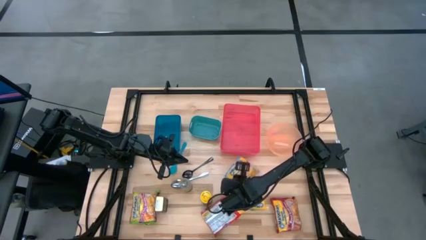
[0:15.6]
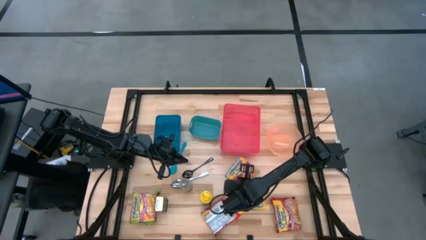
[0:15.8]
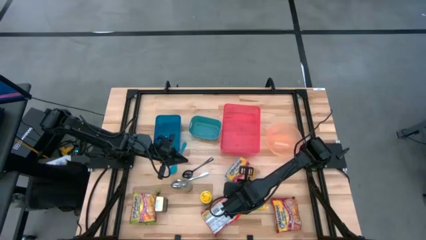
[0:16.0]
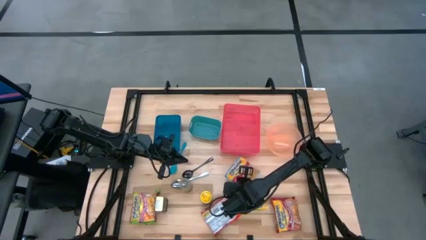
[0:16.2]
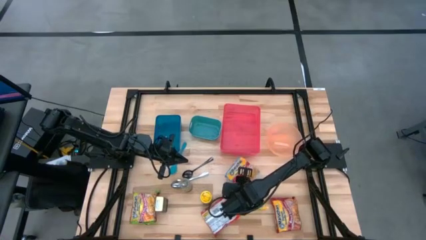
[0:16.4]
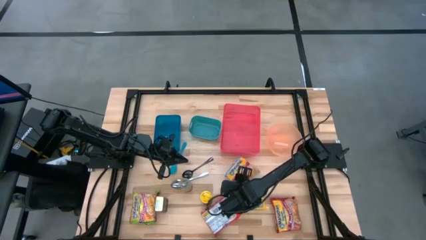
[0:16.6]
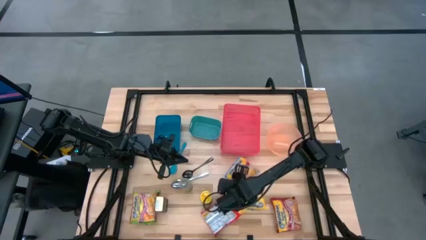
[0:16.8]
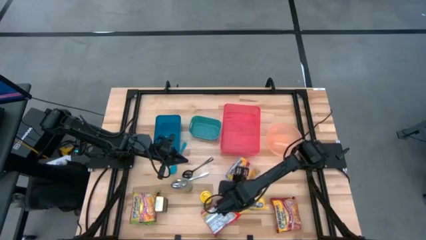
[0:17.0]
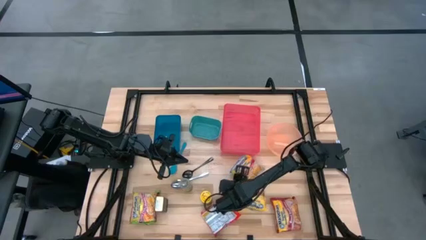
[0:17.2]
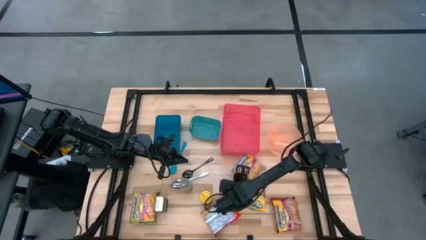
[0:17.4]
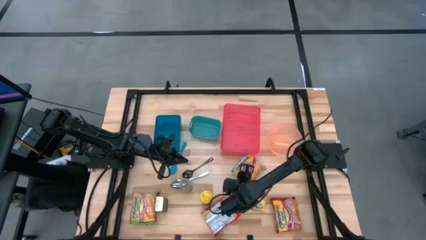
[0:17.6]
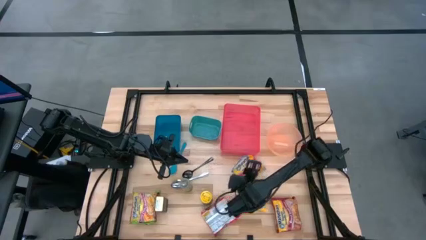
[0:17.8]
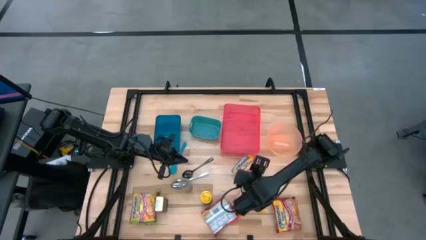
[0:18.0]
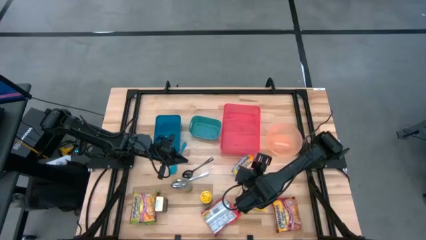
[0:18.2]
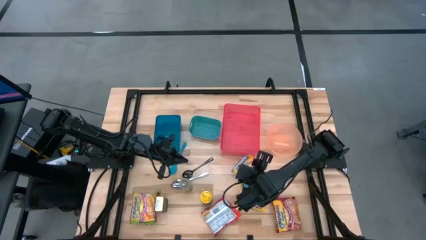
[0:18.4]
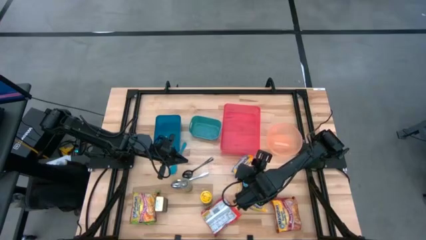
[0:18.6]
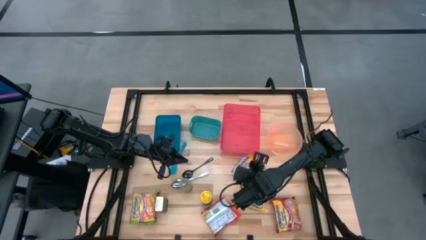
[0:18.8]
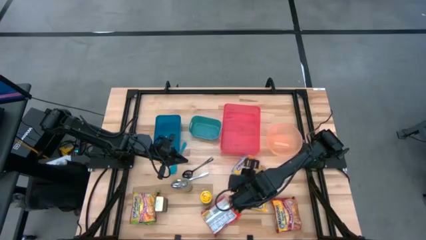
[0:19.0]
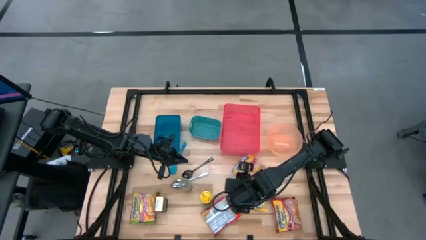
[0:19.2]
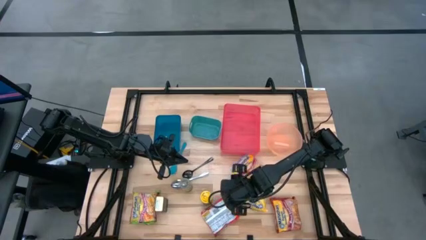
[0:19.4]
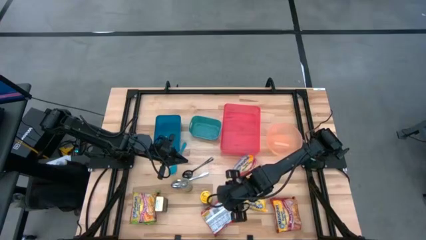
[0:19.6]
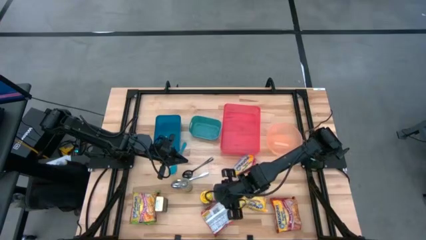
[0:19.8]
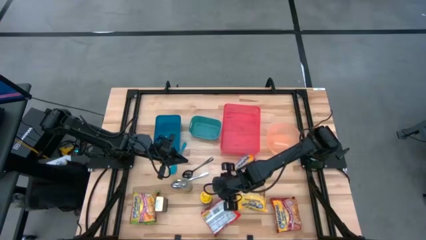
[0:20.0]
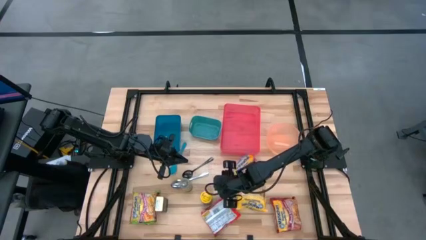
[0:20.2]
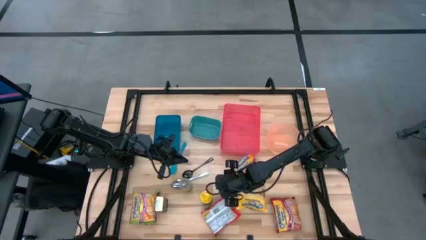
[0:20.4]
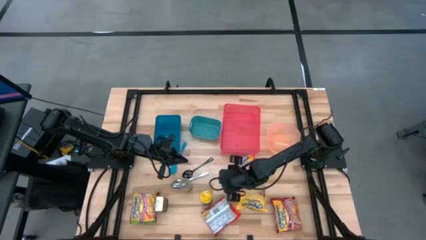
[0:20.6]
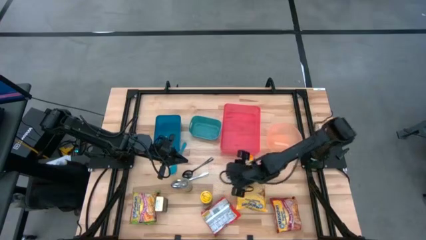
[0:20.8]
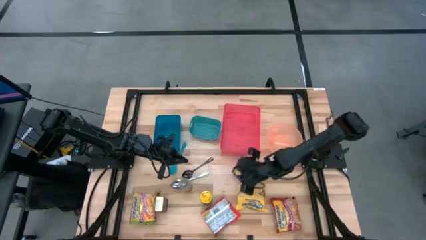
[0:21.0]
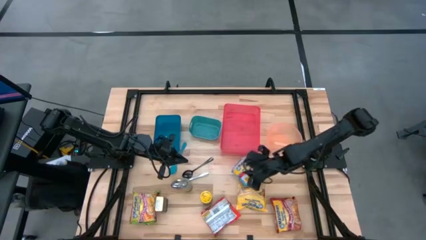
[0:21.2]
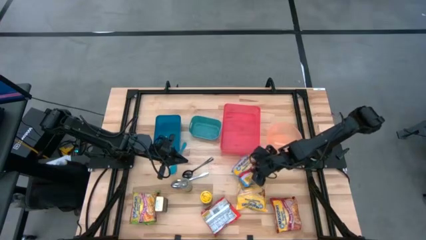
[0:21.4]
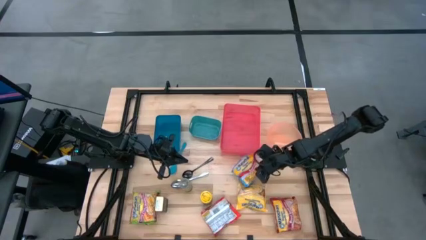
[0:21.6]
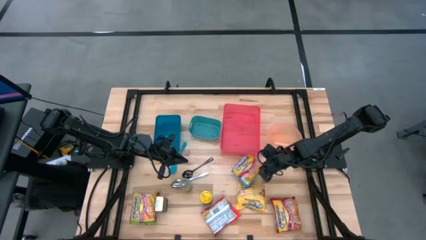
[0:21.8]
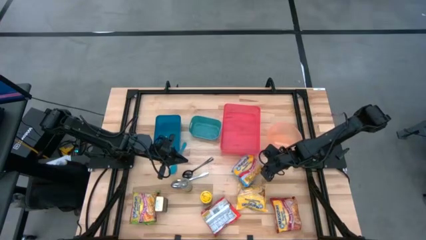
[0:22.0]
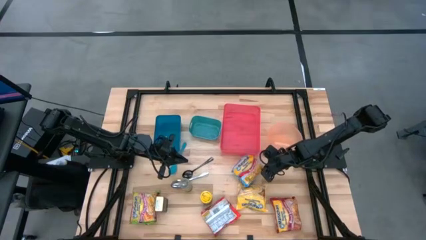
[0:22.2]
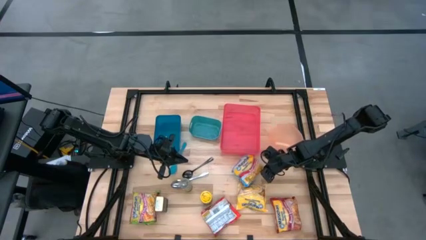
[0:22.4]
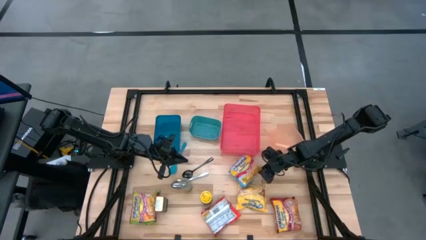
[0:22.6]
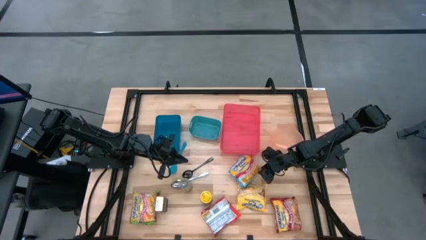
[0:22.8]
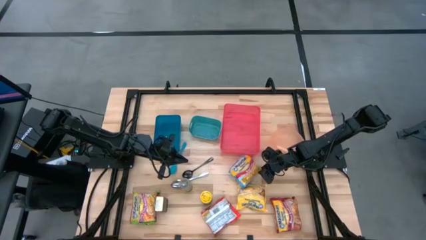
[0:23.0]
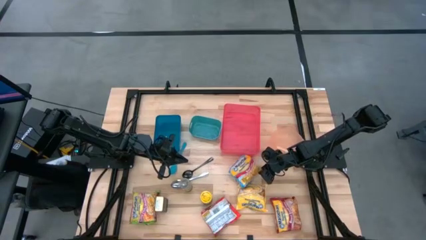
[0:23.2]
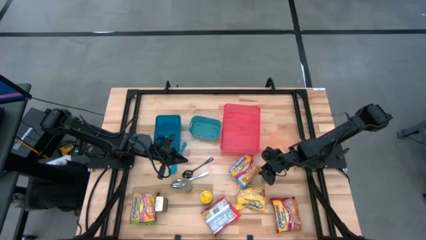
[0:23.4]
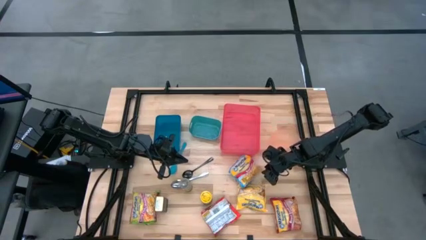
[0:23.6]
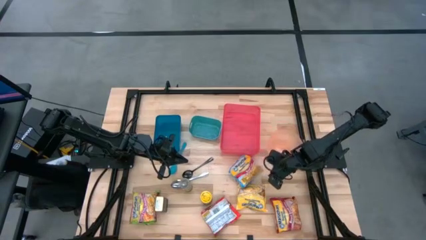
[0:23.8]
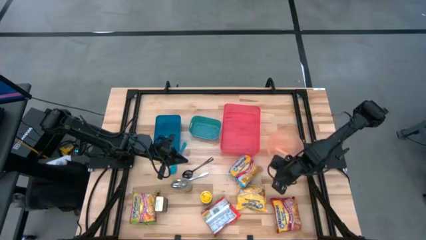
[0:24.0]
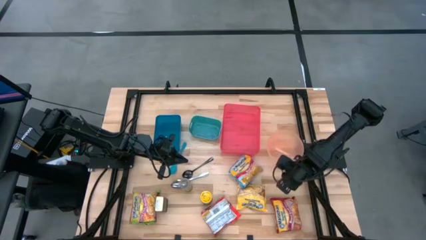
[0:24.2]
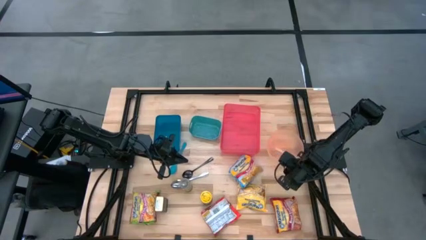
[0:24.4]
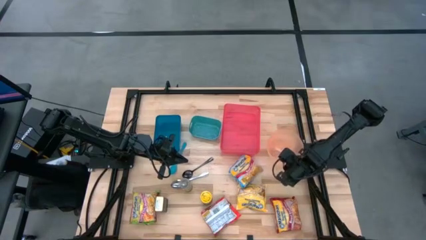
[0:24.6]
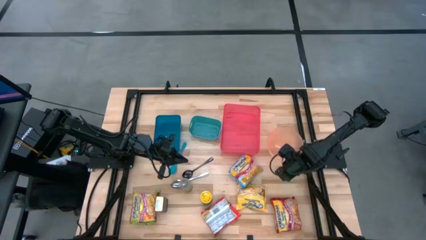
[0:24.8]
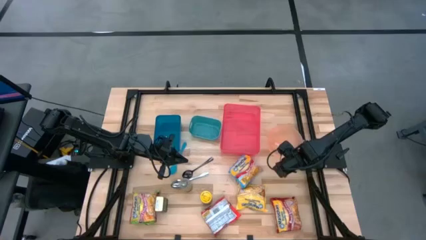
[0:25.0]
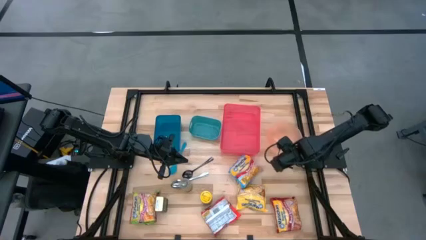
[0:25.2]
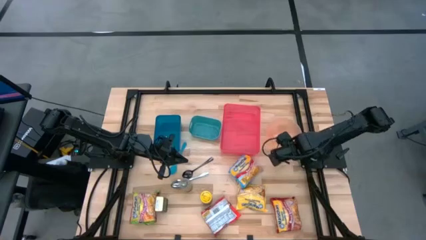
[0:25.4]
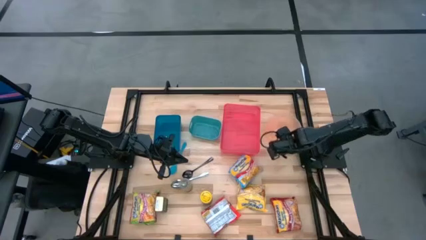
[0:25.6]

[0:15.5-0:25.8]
Task: Pick & Place Food Item
Put the light blue noodle pack into the red bin

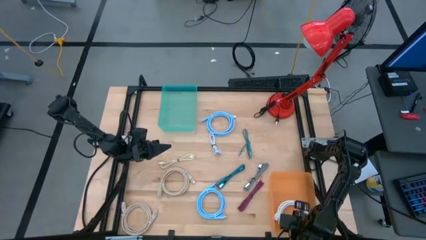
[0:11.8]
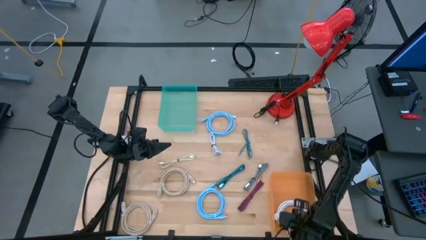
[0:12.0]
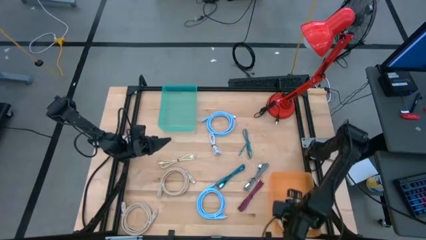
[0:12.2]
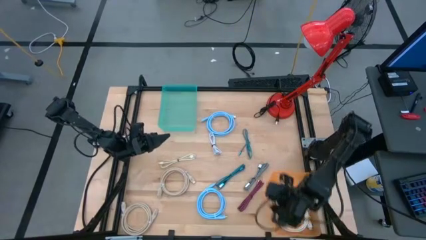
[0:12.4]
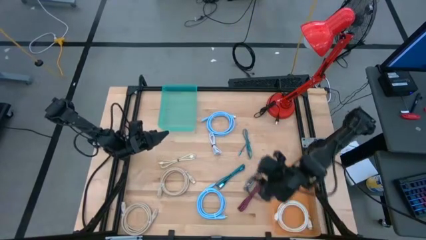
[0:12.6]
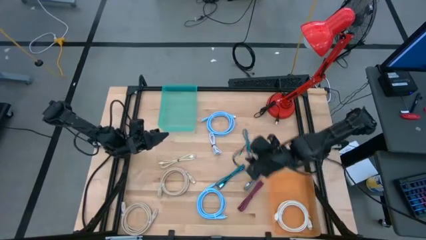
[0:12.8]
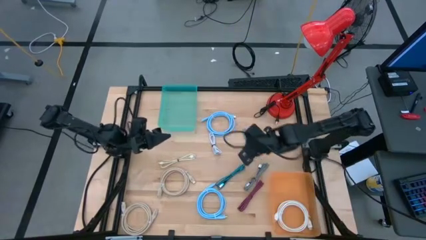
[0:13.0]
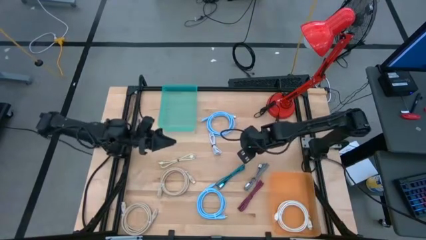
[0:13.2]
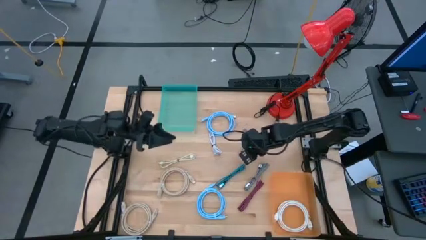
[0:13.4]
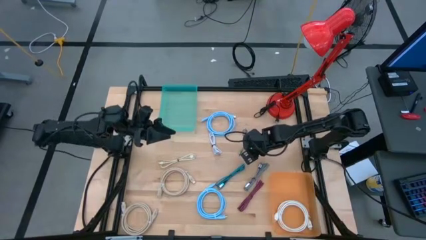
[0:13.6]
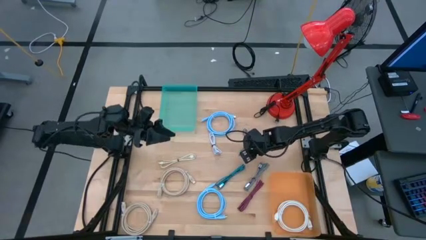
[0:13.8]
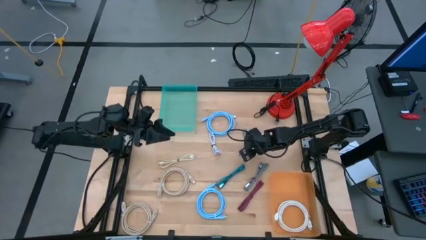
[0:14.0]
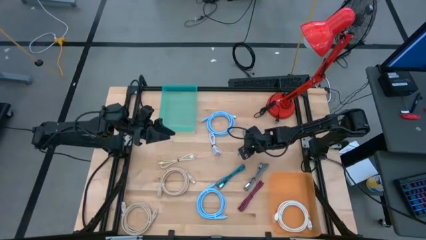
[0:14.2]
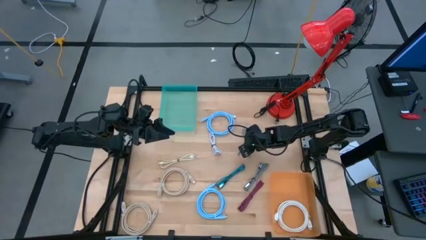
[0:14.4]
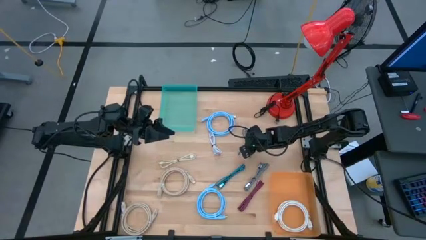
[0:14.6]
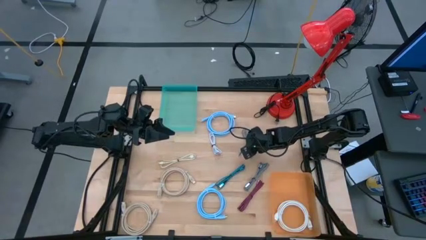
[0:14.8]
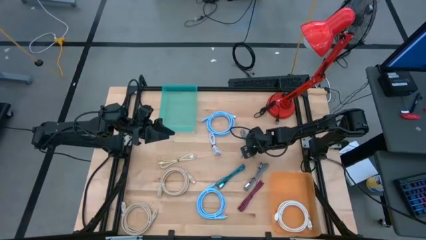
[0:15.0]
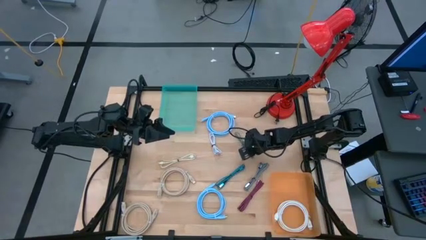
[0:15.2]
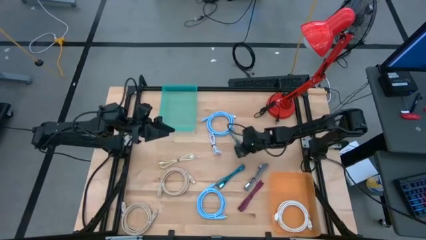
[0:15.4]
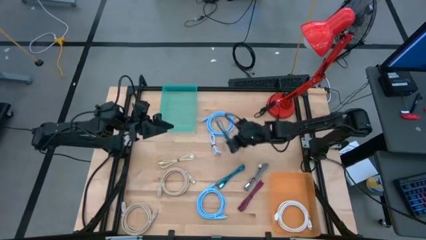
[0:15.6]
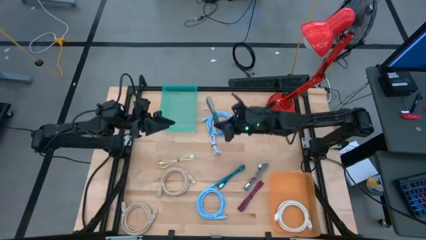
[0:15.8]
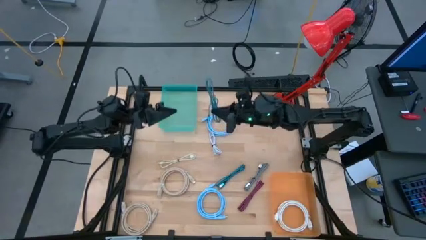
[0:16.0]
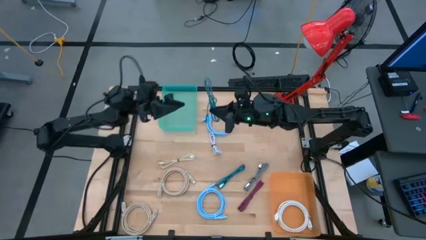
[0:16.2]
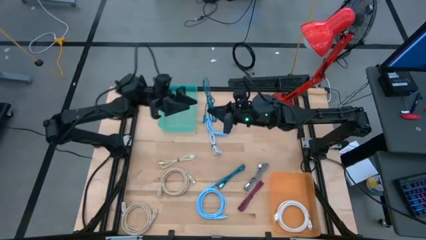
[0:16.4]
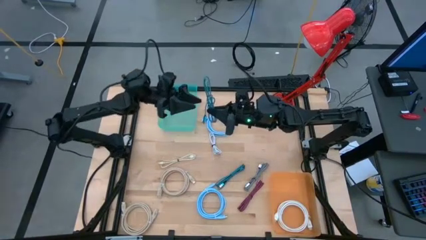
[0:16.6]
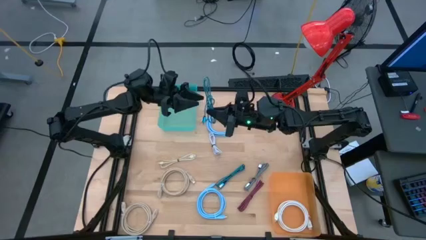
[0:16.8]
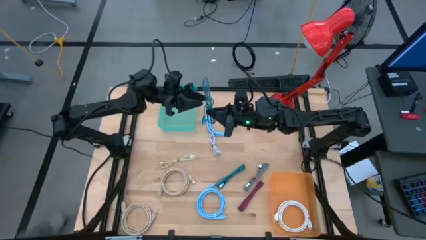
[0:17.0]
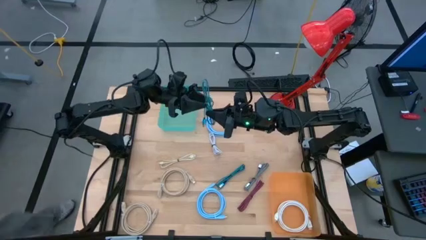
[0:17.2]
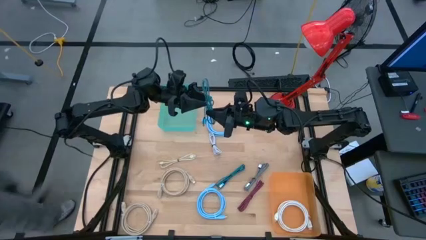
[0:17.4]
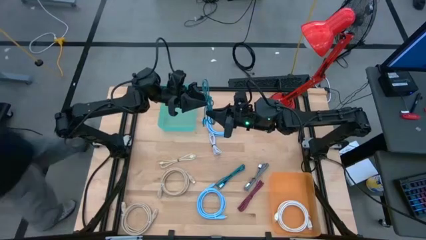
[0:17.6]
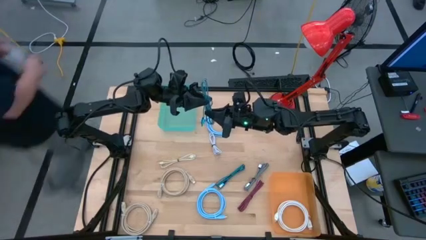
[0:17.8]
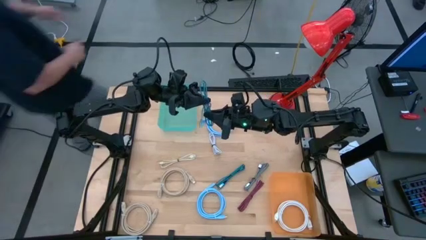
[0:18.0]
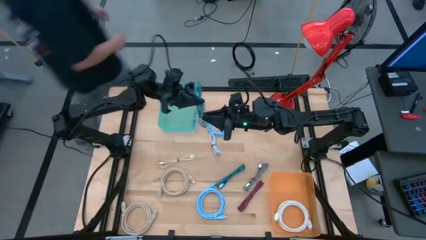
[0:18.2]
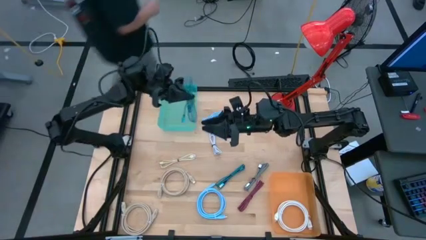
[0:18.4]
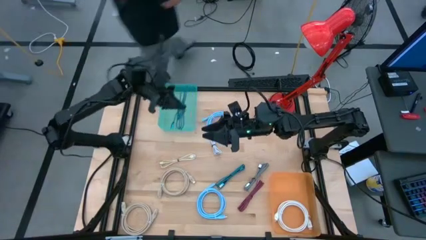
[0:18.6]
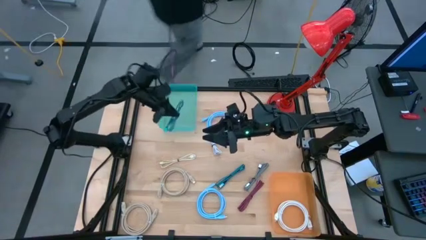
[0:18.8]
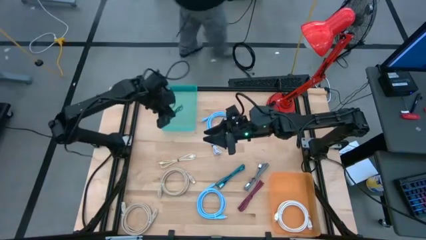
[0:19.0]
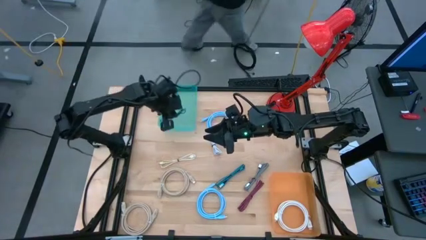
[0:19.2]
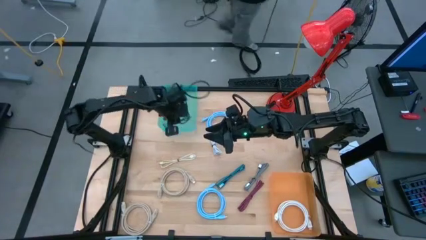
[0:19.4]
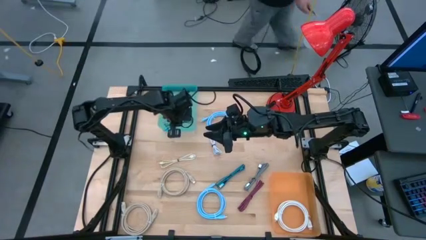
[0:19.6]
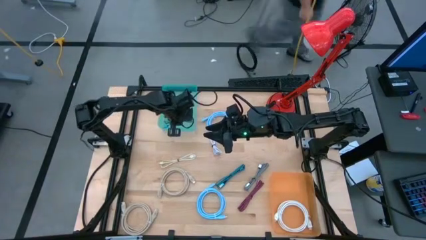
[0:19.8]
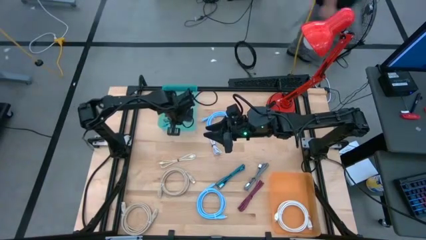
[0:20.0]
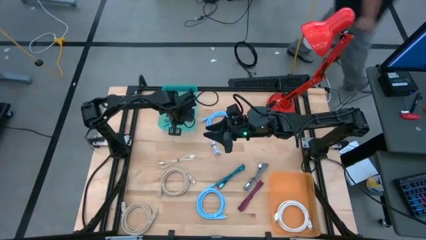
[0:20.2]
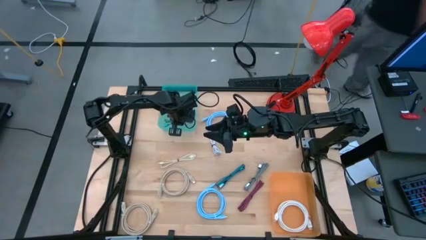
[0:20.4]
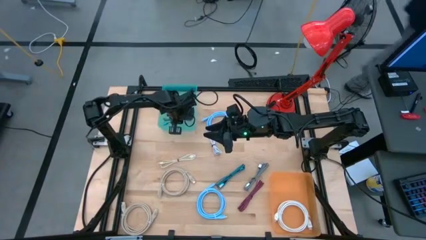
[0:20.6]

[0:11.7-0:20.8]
Task: Pick & Place USB Port
Put the top blue USB cable into the blue bin
